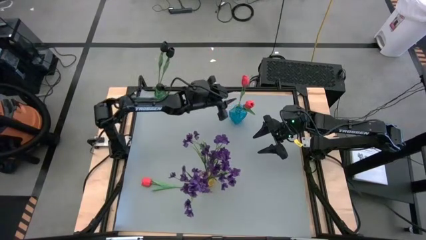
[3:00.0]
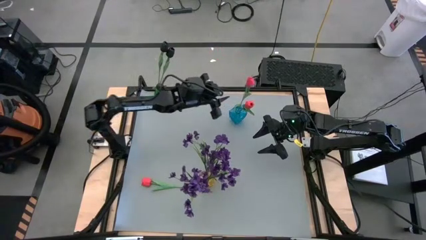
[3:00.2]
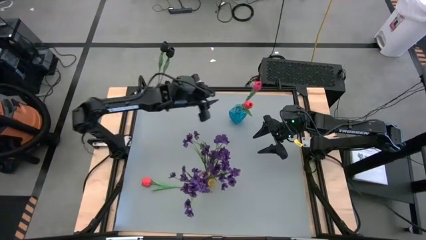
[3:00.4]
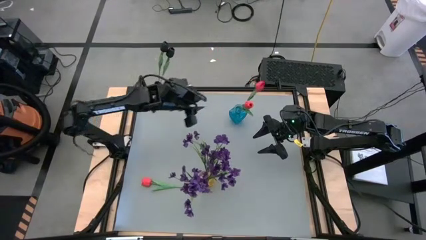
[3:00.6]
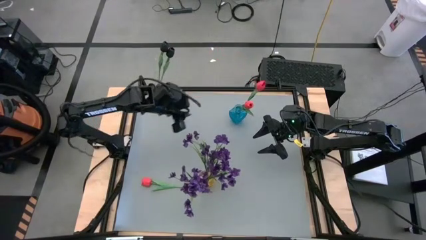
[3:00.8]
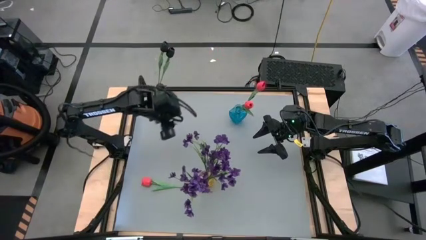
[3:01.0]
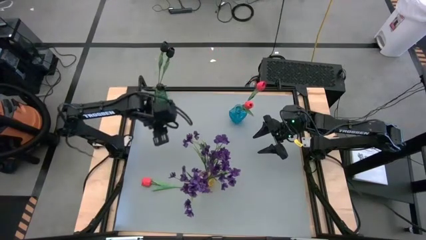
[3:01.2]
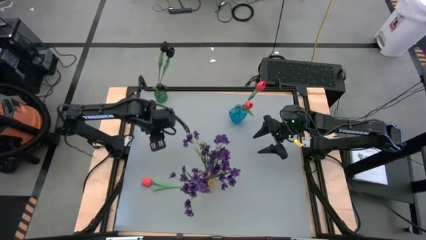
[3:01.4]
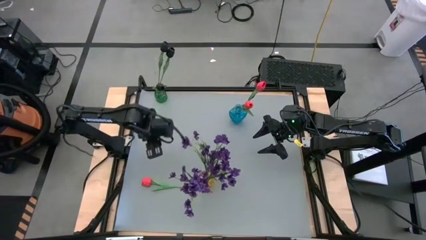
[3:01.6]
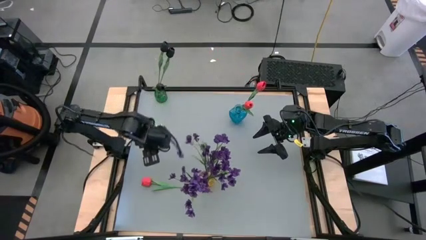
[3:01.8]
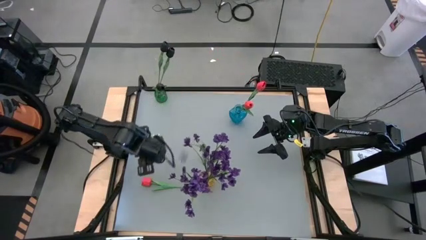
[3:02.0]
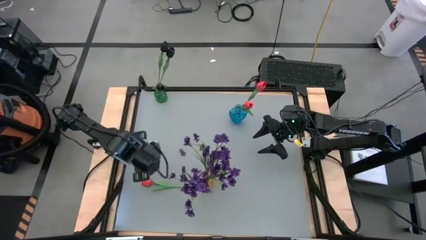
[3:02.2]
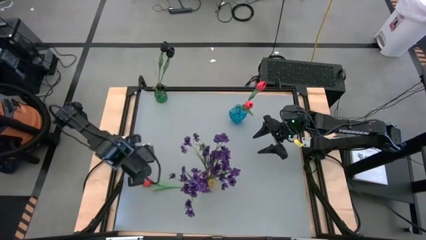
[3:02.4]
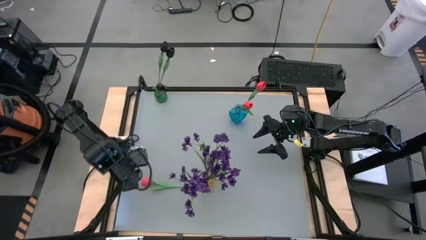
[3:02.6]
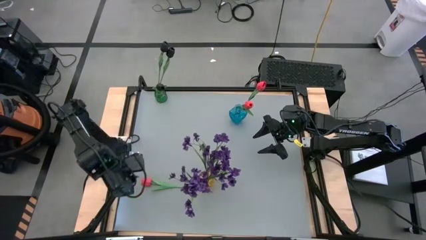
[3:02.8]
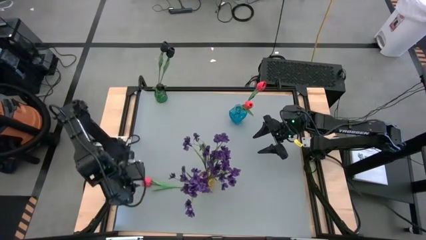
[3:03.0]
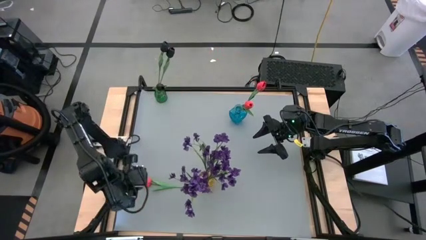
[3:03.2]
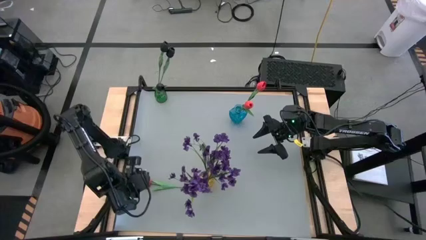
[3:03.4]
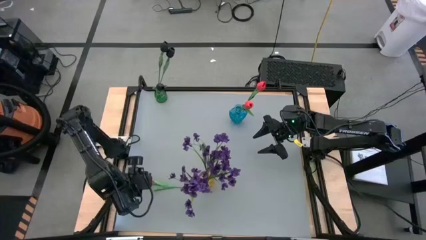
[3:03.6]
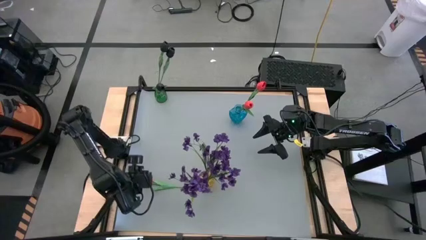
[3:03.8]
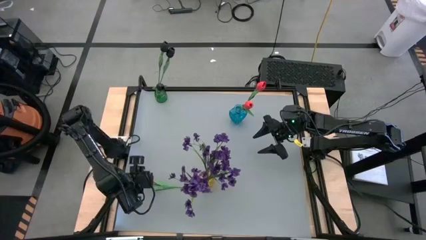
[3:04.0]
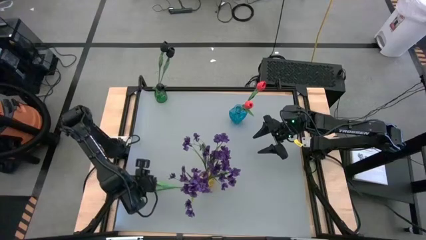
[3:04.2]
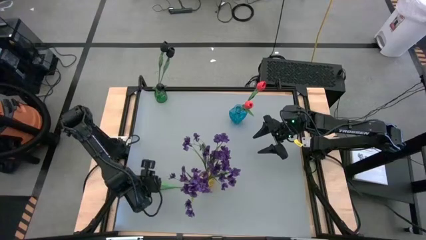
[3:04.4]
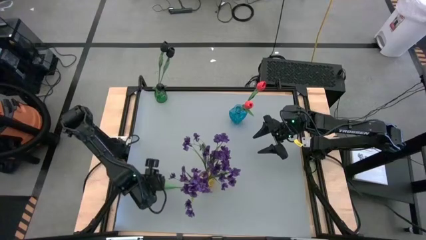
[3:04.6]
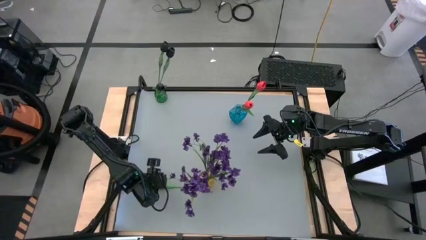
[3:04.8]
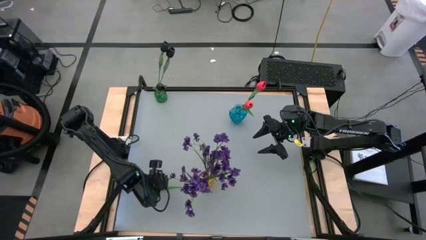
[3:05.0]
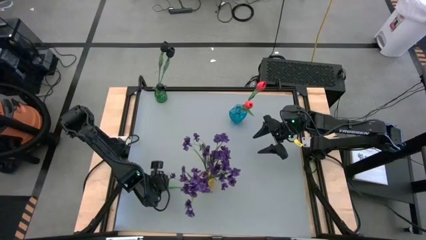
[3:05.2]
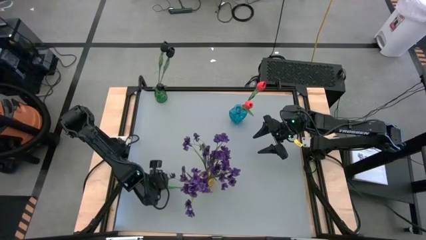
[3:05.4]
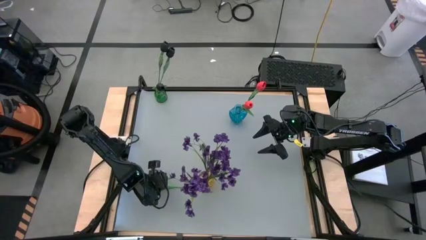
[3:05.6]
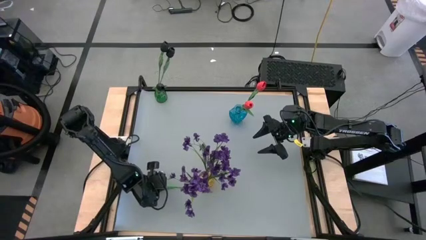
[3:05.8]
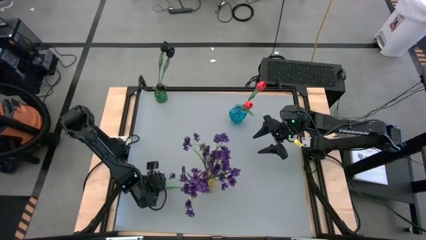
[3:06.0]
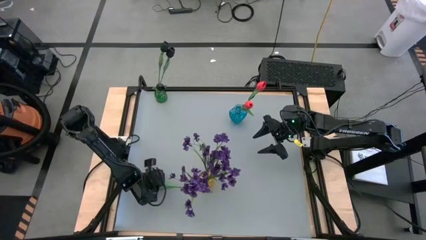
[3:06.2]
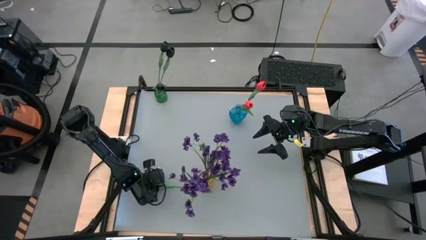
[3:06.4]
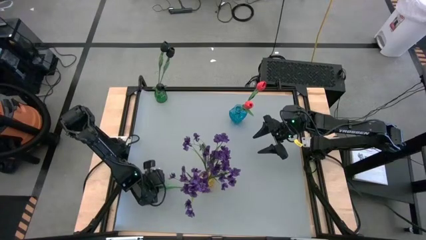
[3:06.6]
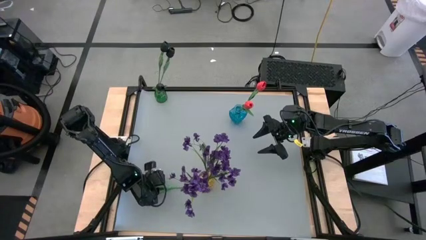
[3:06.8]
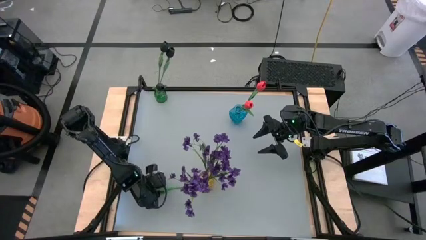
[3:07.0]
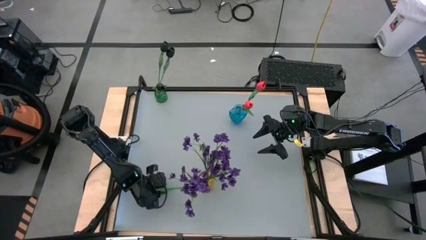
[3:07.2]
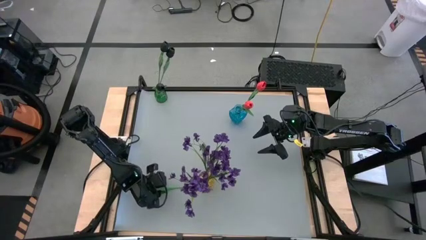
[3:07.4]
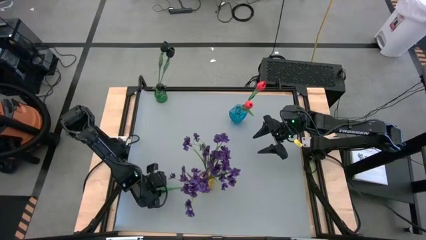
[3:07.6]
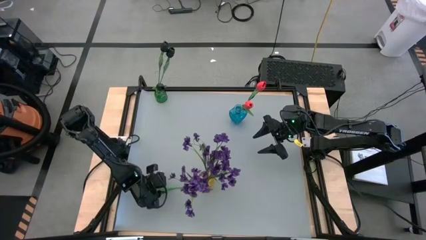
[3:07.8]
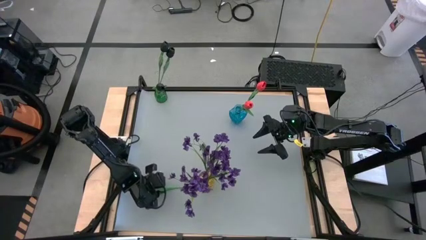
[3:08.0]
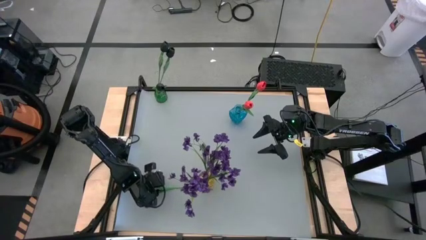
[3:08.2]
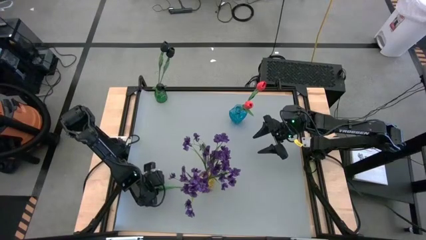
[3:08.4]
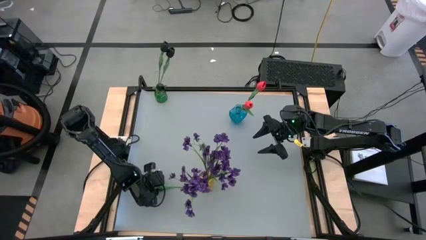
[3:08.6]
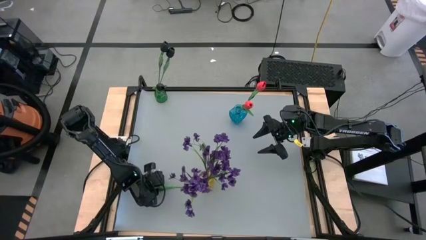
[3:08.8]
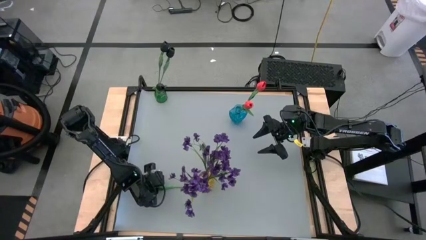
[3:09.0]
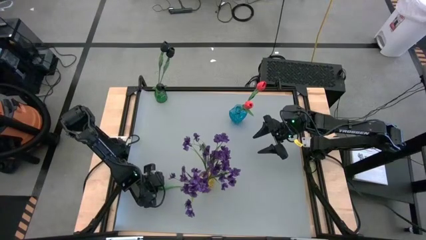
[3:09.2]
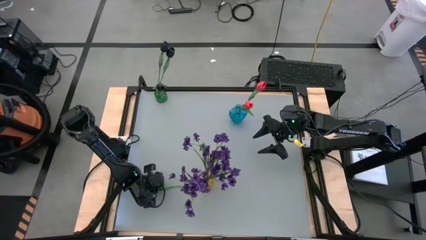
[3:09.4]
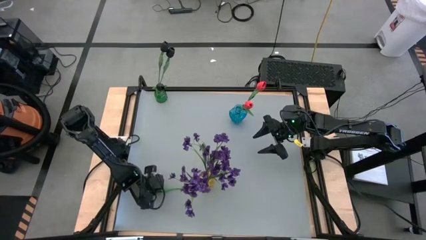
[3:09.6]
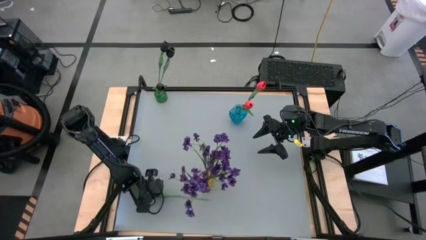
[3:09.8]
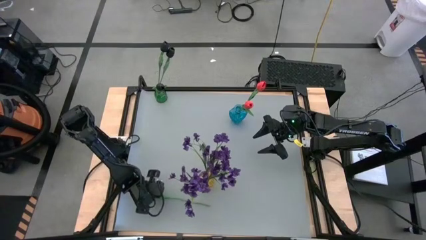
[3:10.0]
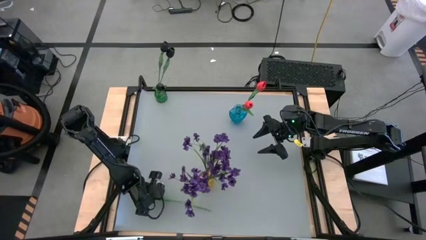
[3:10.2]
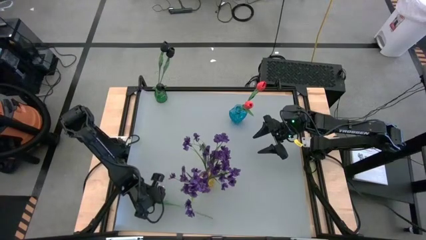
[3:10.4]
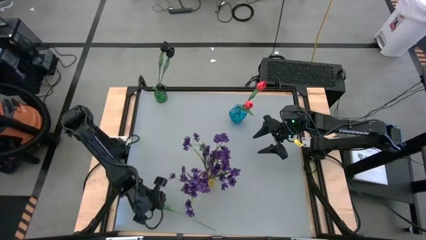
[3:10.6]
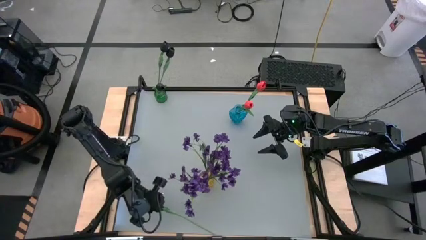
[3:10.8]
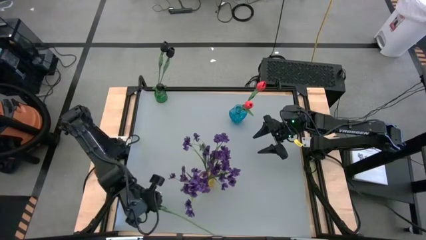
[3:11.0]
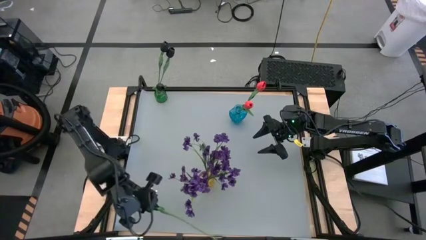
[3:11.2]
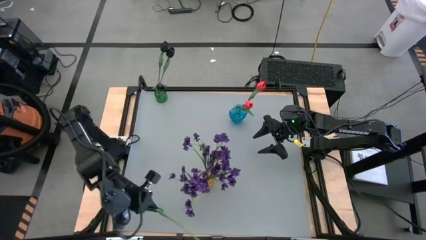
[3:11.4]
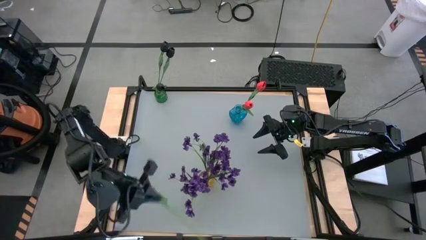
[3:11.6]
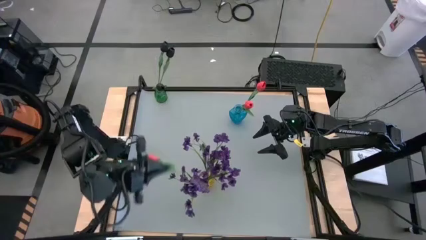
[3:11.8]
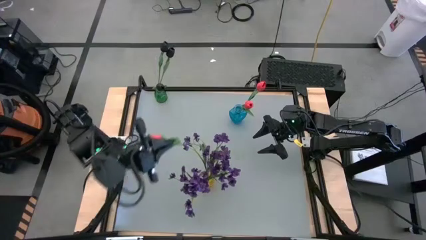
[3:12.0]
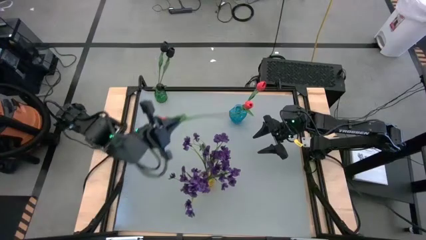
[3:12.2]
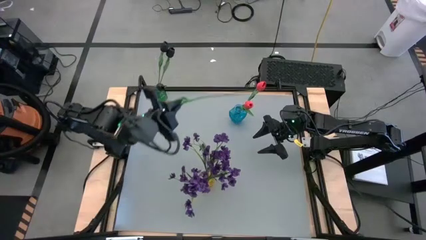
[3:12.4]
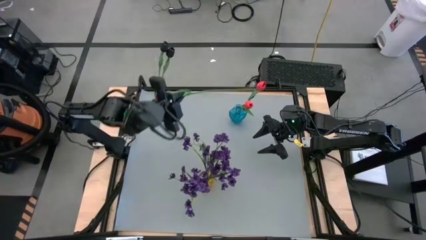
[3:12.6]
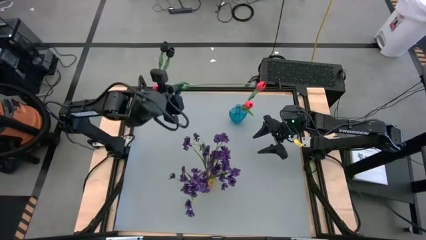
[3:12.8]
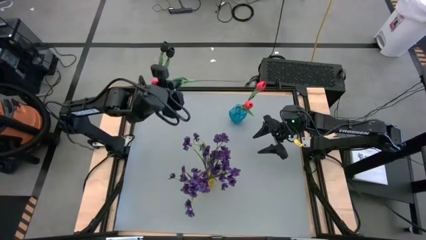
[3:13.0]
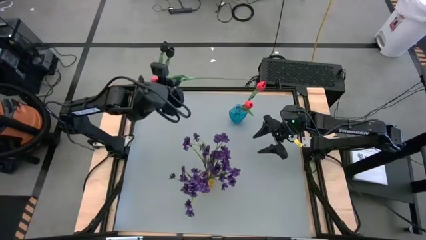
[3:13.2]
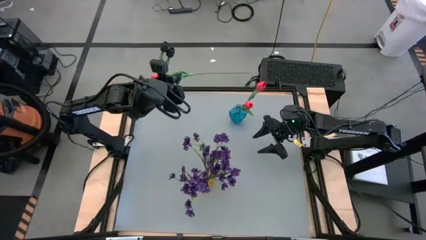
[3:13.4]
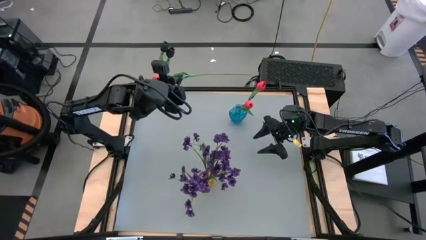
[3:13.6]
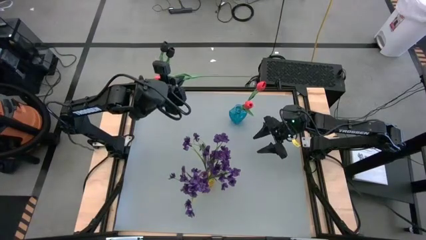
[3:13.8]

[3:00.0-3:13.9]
Task: Sort flowers into vase by color
Put the pink flower into the blue vase

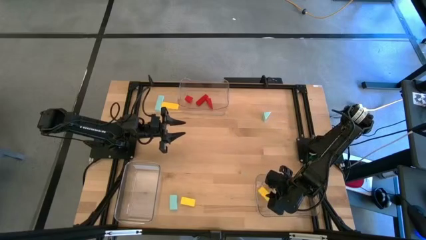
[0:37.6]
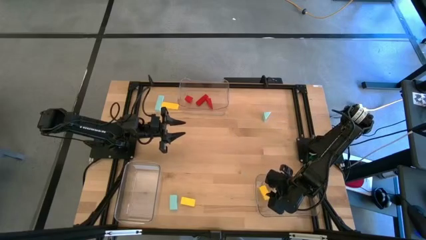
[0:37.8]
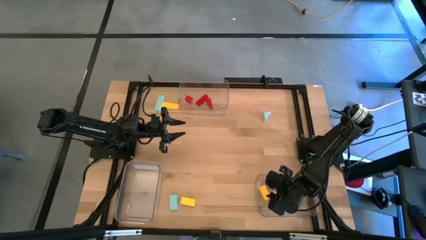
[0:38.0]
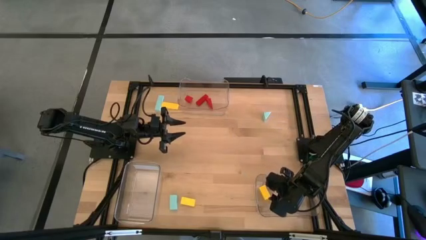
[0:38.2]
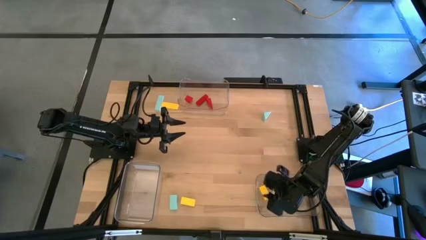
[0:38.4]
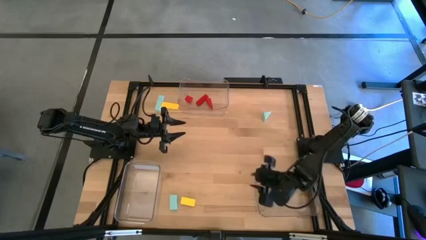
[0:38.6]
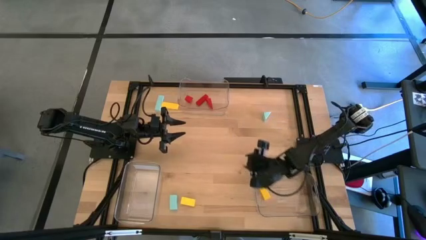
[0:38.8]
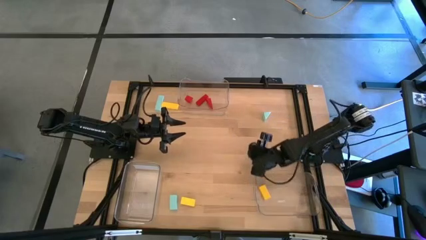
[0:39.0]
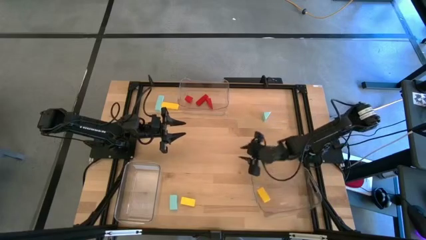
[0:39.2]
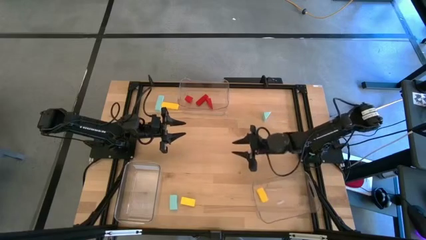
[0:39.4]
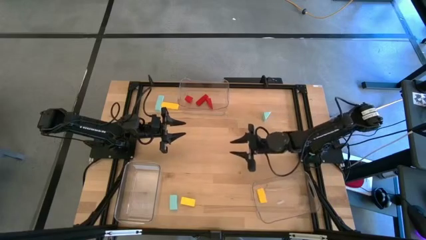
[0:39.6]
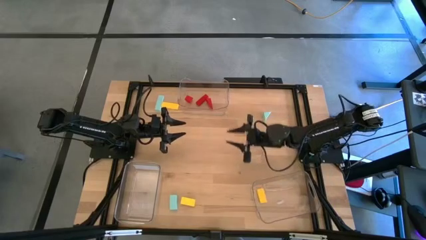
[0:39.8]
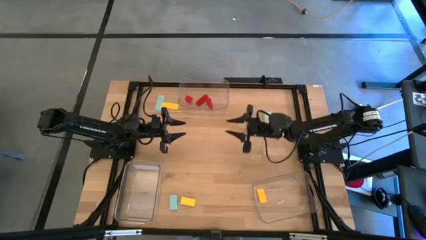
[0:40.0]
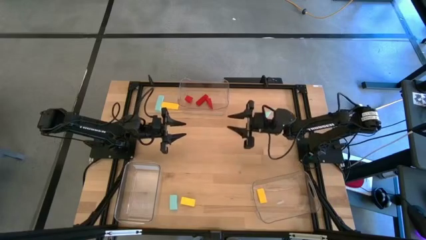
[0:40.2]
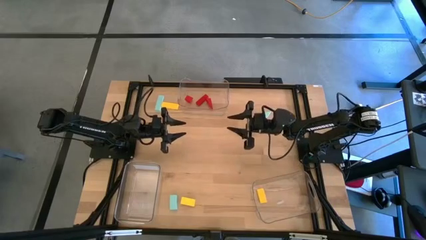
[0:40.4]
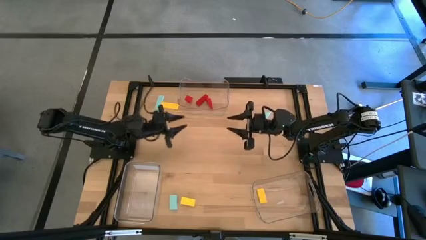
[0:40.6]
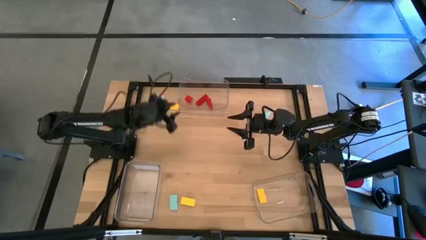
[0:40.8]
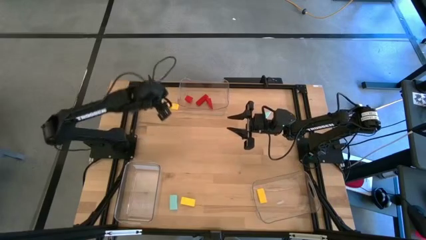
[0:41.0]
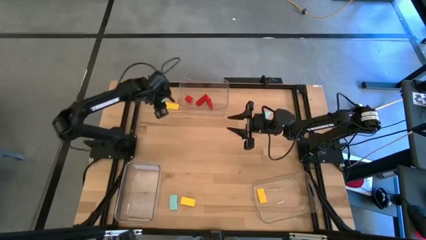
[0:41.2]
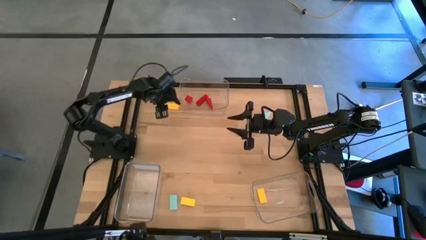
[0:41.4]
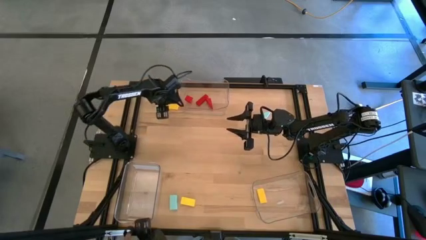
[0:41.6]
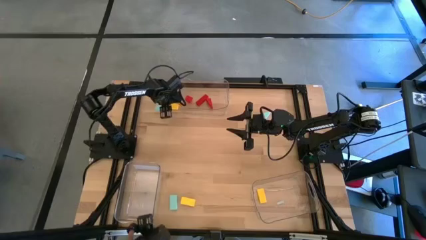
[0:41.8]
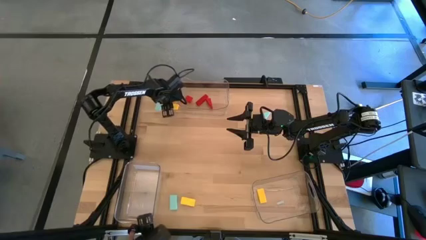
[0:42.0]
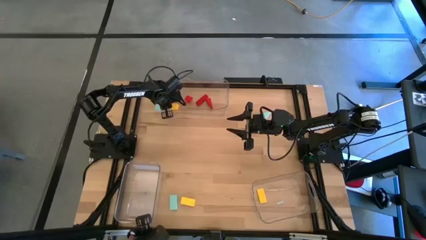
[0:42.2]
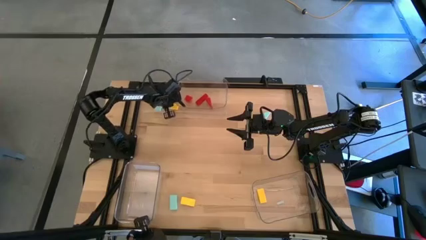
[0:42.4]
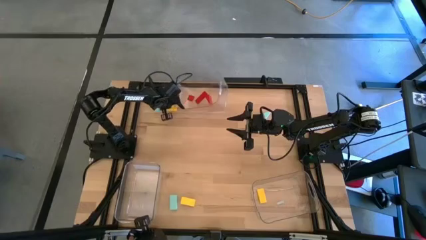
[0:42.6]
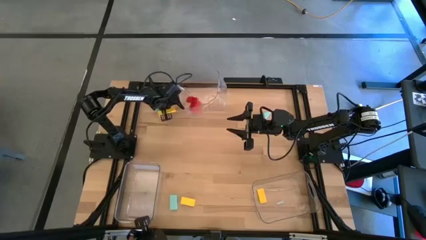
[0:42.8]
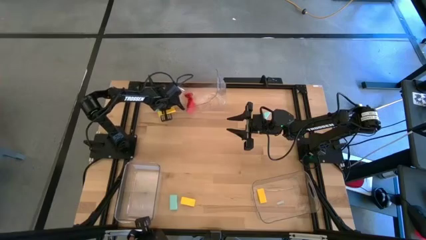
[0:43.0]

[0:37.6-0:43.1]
Task: Sort & place blocks by color
Put the top yellow block into the bottom left transparent bin
